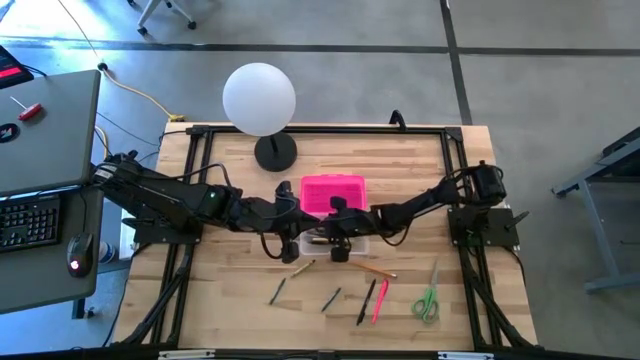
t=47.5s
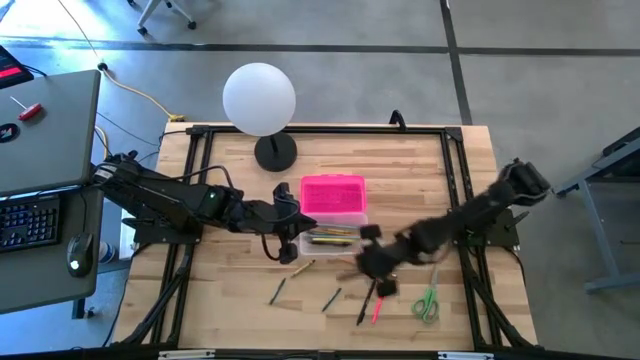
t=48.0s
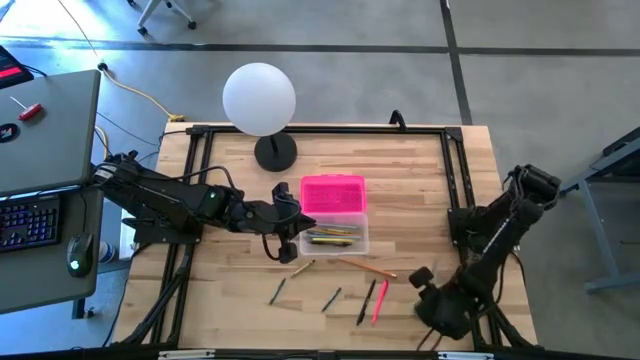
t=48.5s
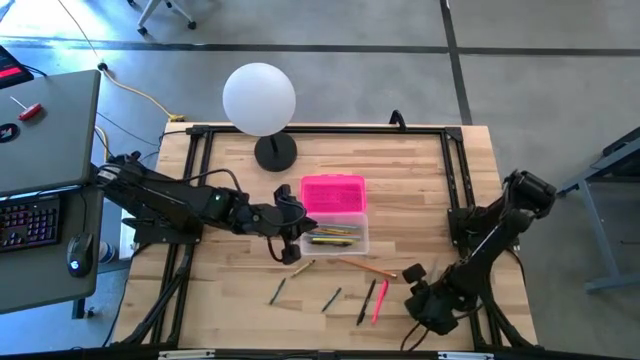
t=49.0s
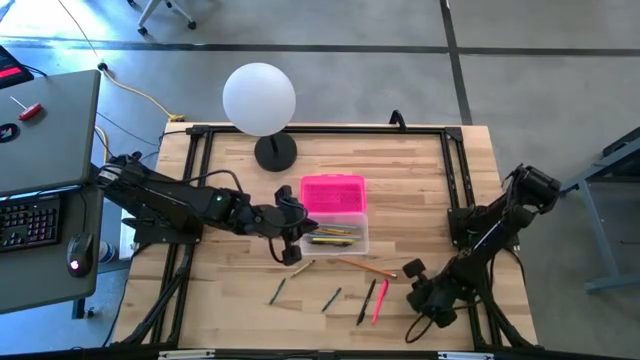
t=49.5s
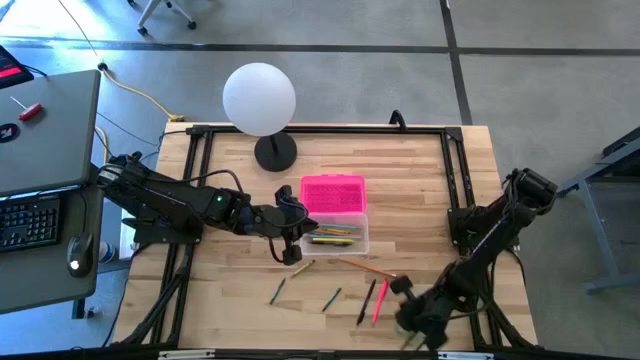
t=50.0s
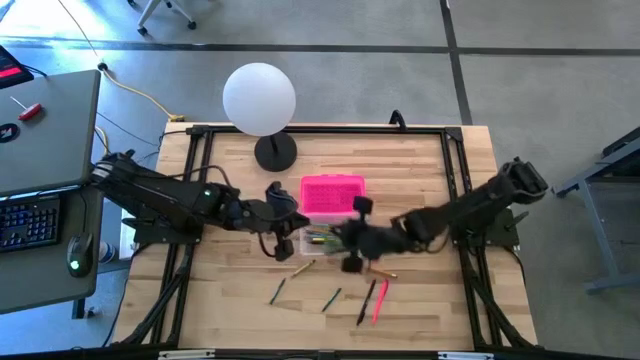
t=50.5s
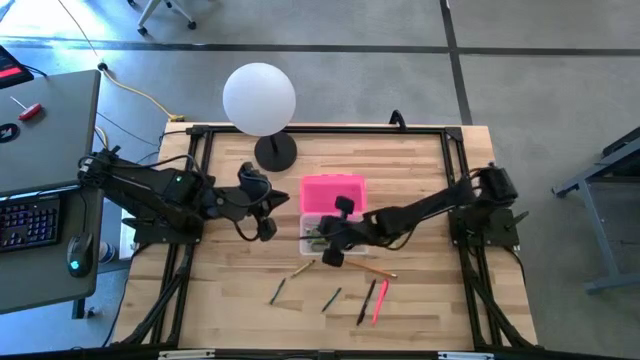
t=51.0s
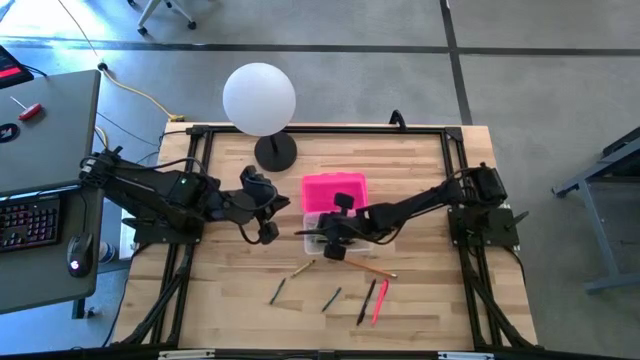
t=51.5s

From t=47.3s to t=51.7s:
Task: Pick & place school supplies into a supply box
Put the green scissors into the pink supply box

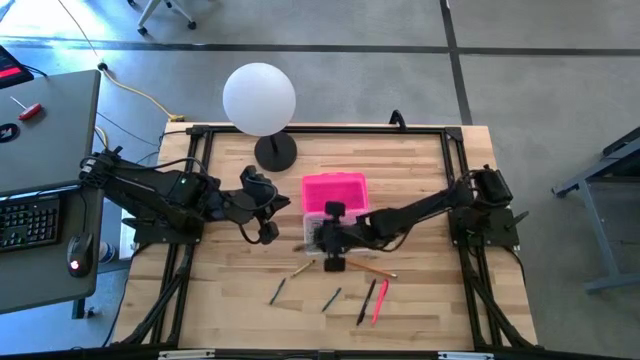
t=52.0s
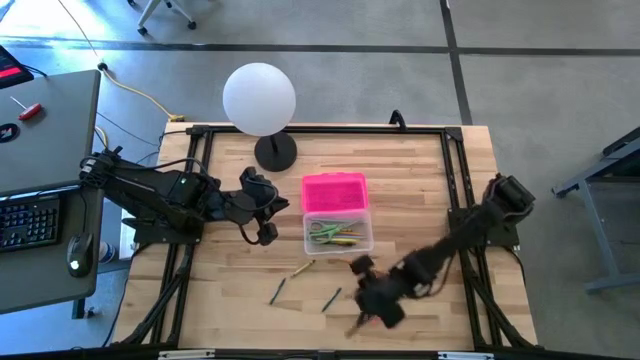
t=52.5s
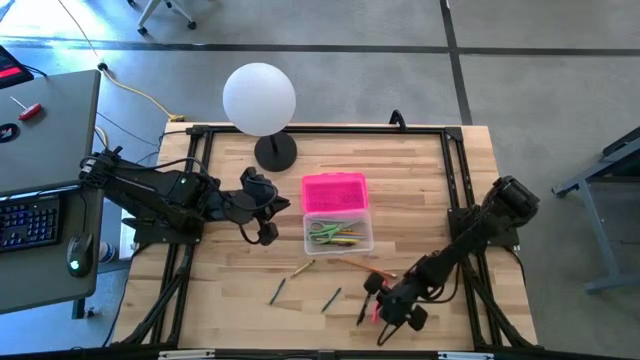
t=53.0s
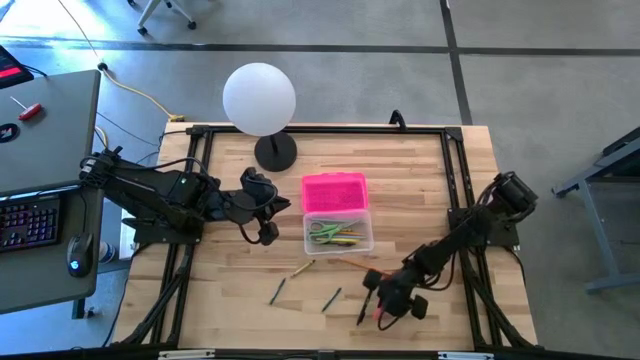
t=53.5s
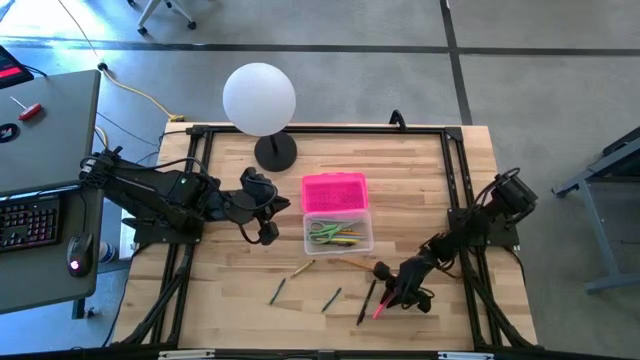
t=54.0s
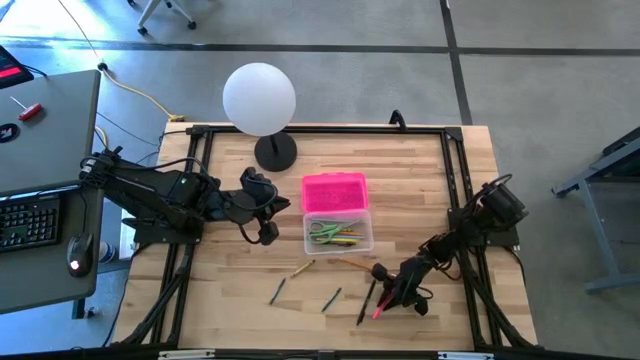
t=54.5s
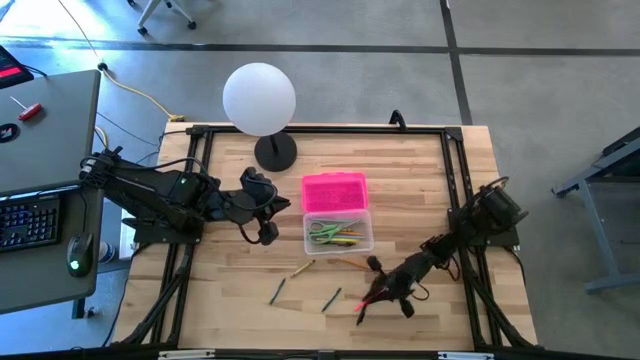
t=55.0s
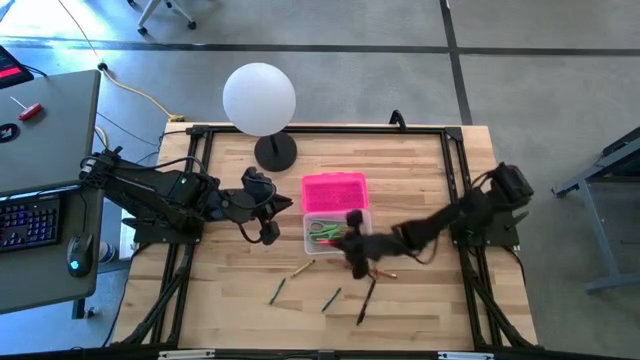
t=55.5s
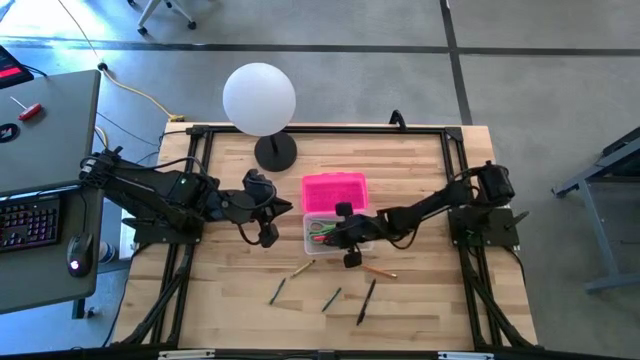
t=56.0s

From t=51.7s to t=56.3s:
Put the pink pen into the pink supply box

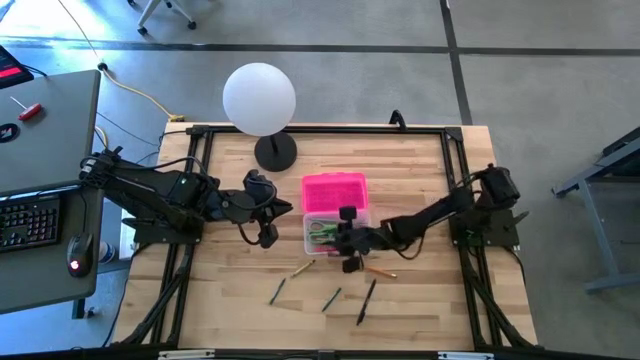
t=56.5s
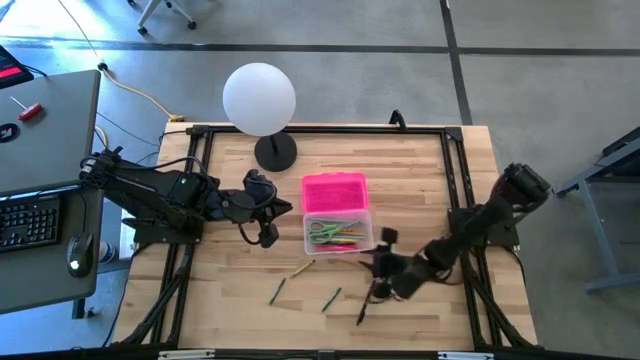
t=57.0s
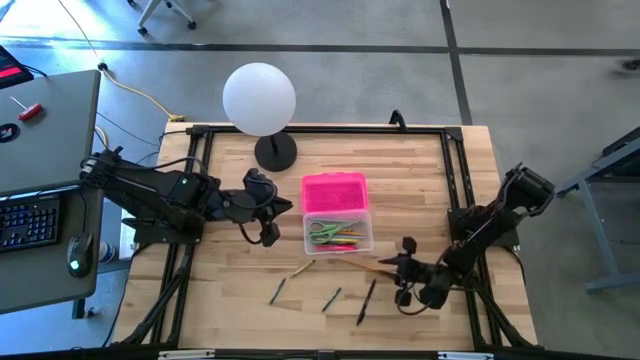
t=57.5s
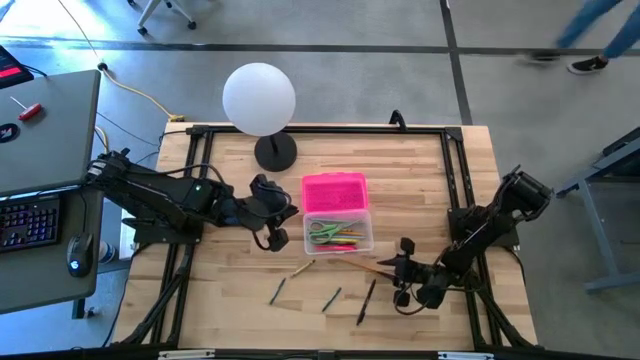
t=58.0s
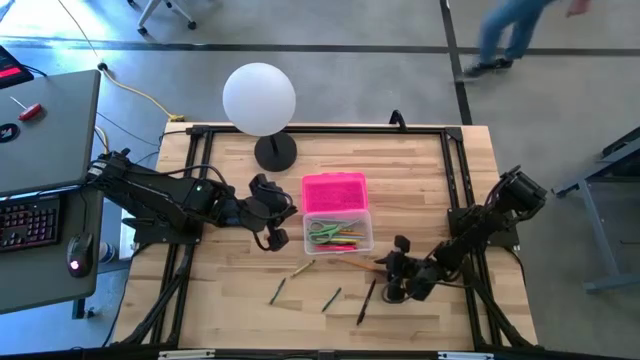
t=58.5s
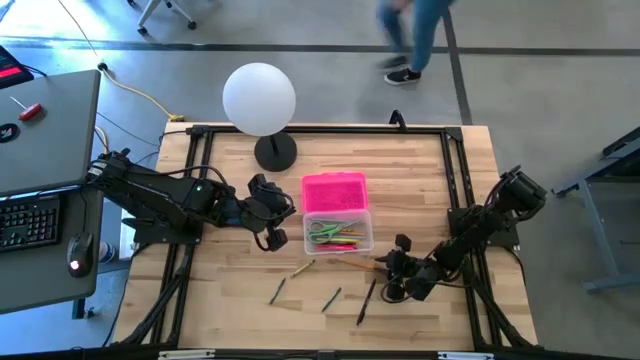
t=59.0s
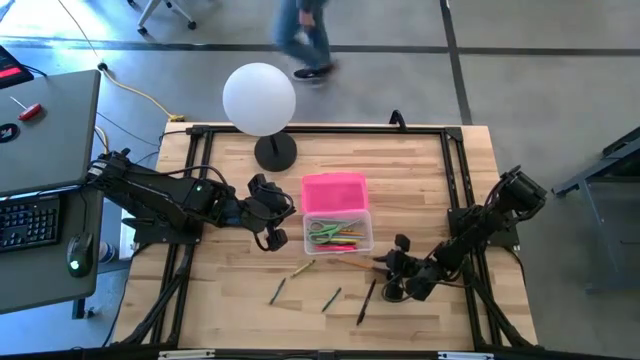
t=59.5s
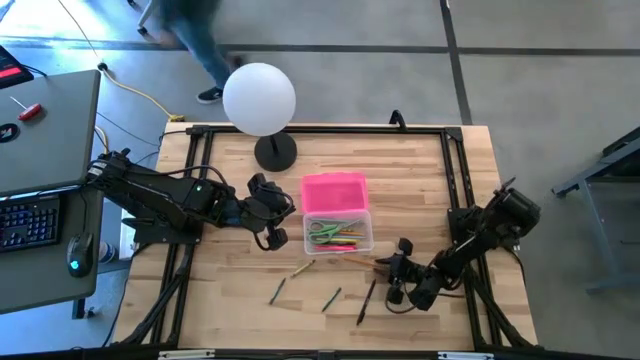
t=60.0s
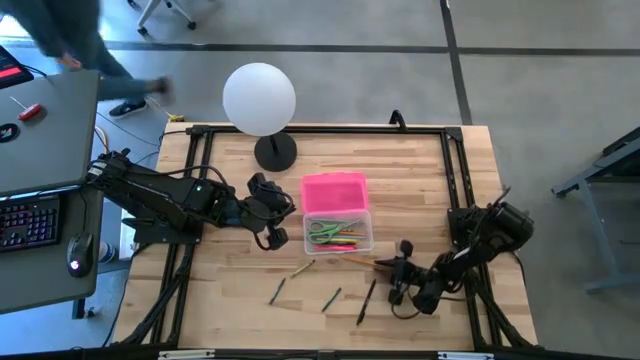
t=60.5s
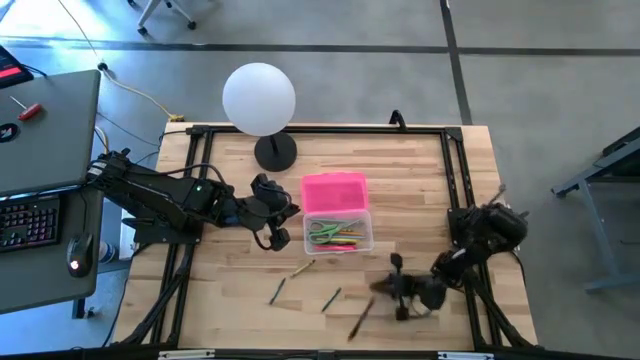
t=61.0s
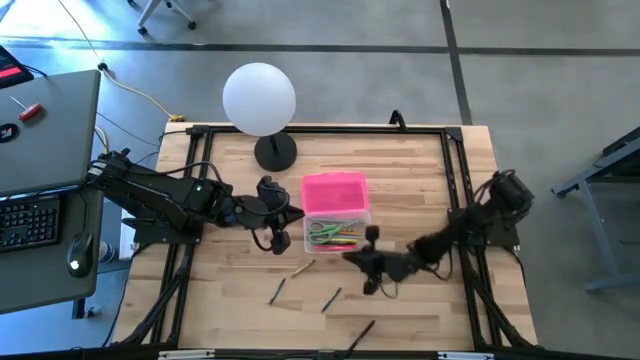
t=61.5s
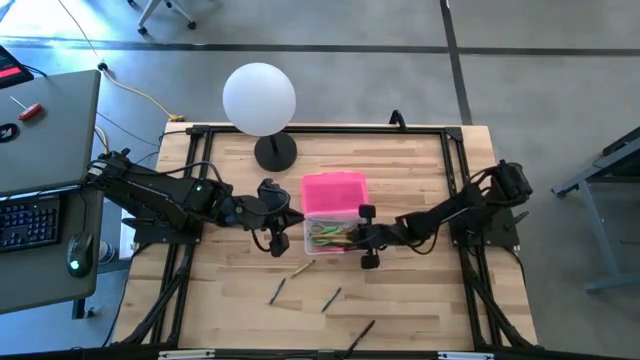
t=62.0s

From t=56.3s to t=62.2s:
Put the orange pencil into the pink supply box

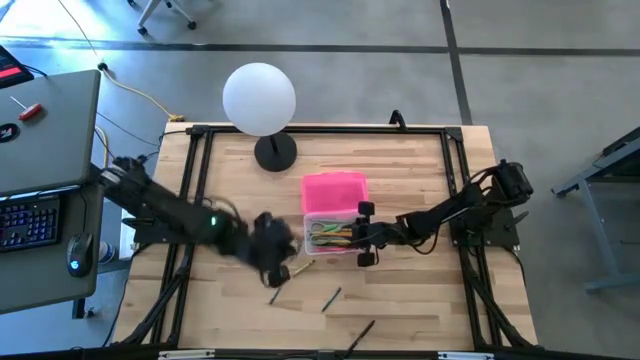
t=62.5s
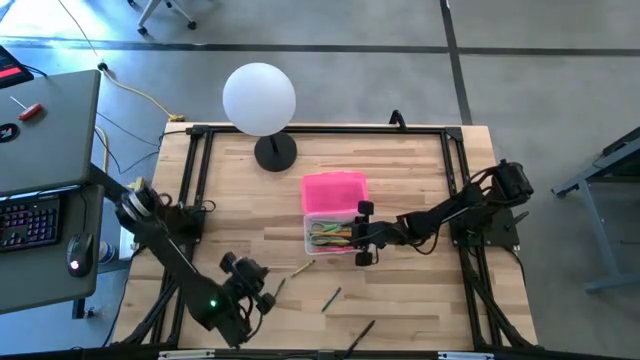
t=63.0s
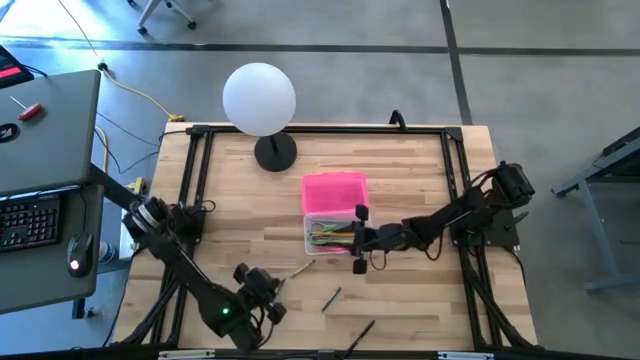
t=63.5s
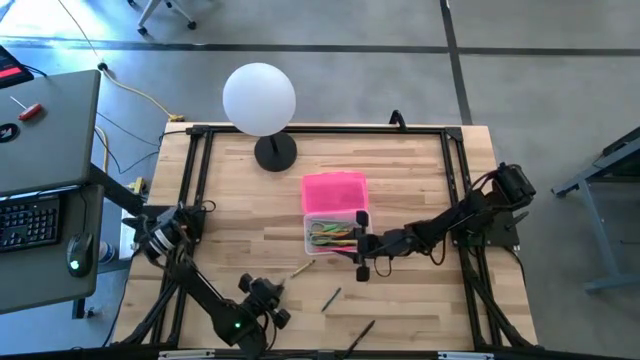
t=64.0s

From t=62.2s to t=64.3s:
Put the green crayon into the pink supply box

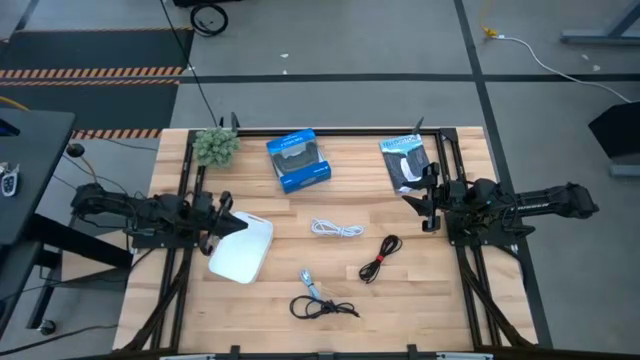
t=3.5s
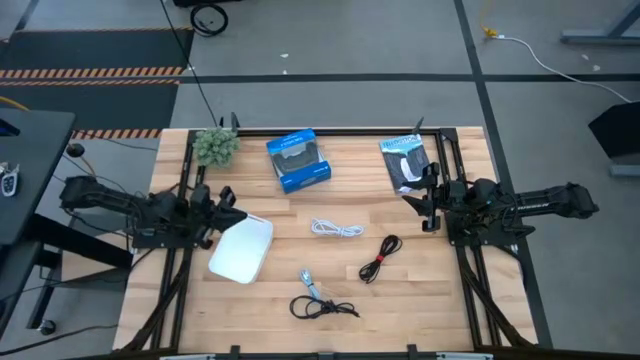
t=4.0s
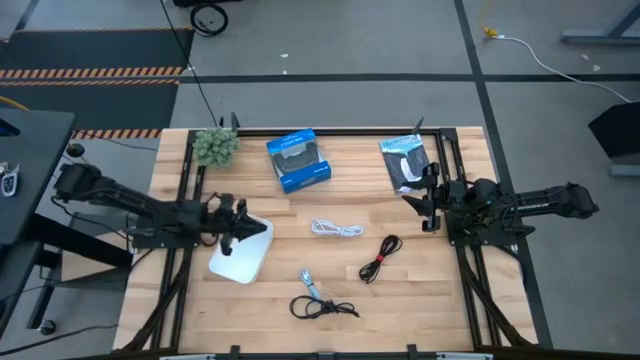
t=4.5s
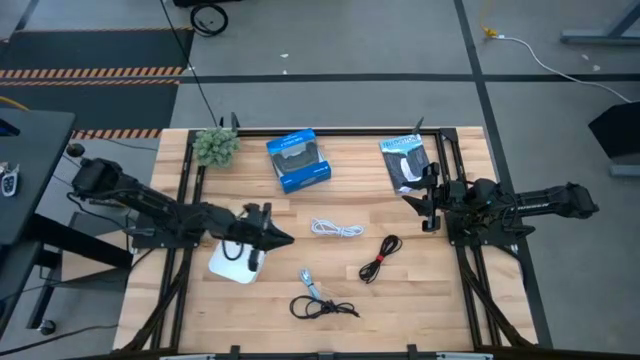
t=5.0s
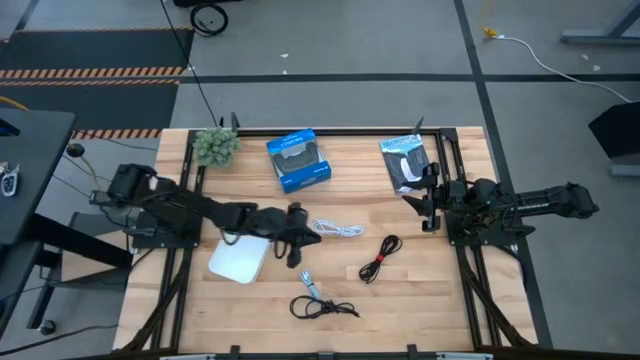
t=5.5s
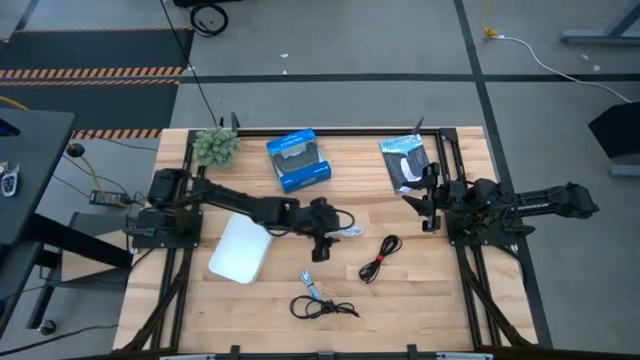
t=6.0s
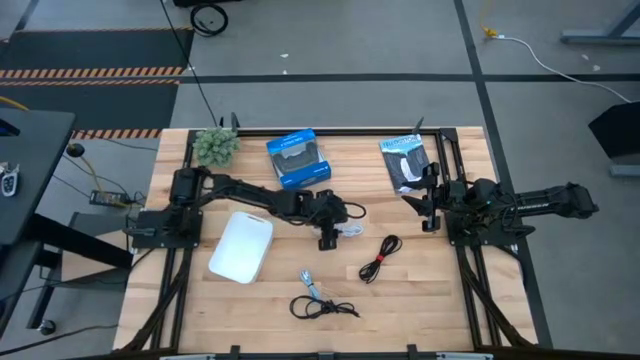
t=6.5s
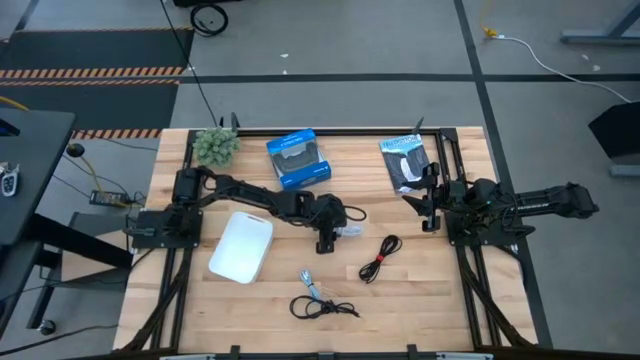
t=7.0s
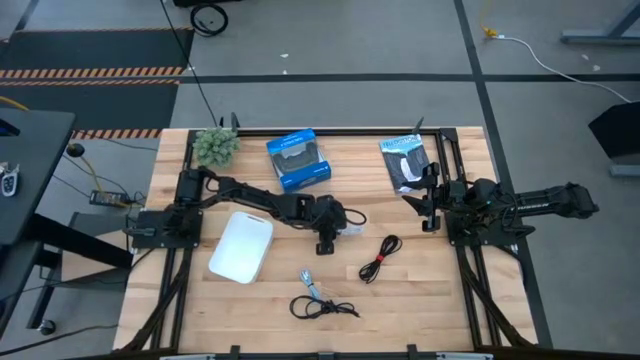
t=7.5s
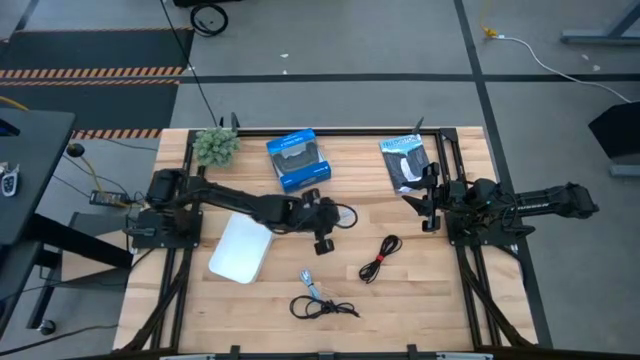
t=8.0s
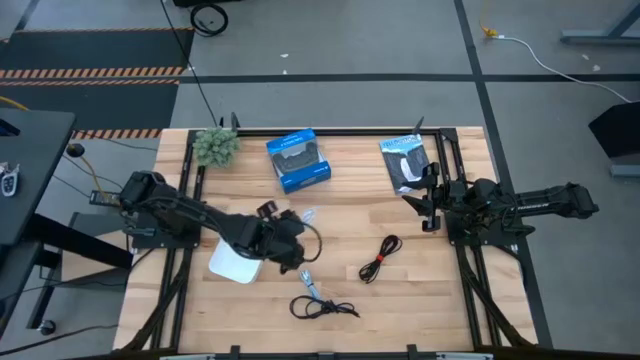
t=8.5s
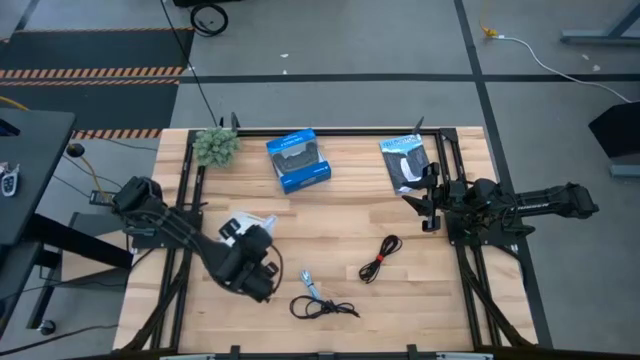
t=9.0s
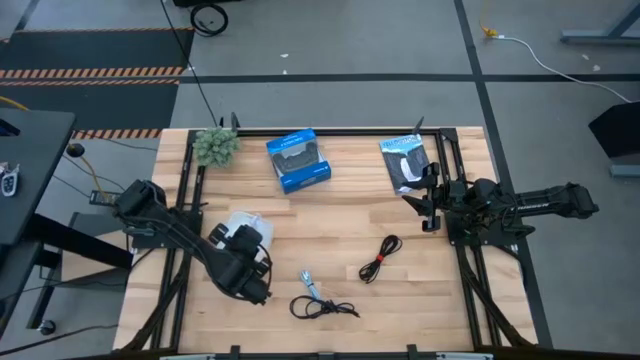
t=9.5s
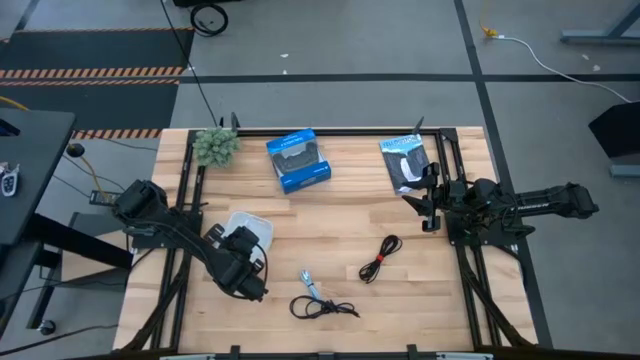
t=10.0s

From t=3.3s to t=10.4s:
Task: Pick and place USB-C Cables
Put the white charger cable into the white bin
